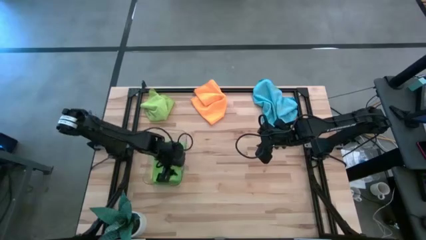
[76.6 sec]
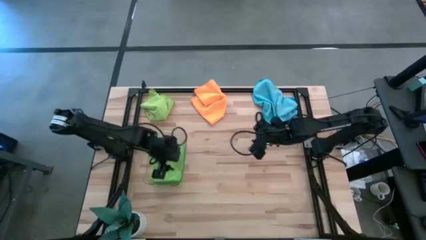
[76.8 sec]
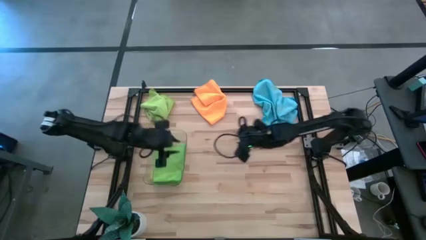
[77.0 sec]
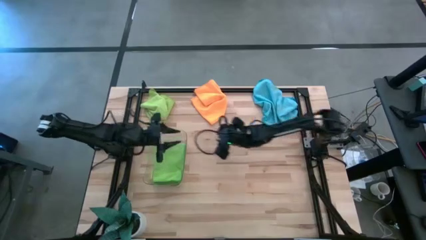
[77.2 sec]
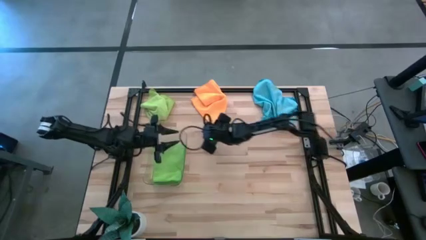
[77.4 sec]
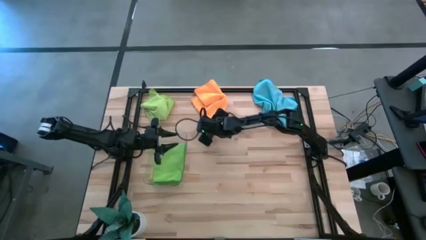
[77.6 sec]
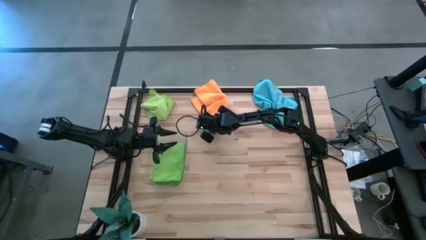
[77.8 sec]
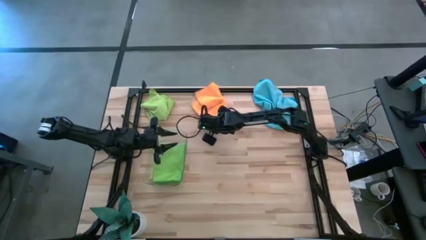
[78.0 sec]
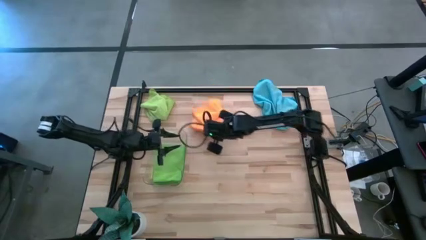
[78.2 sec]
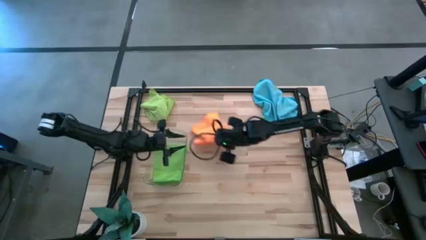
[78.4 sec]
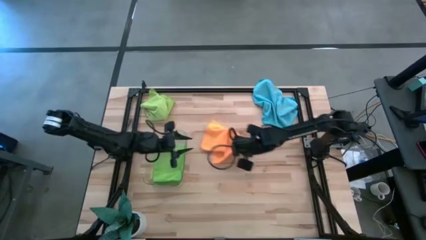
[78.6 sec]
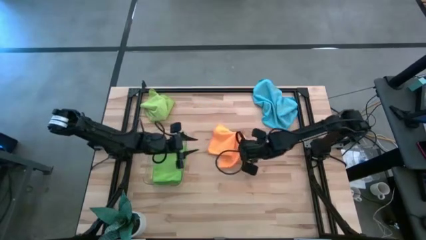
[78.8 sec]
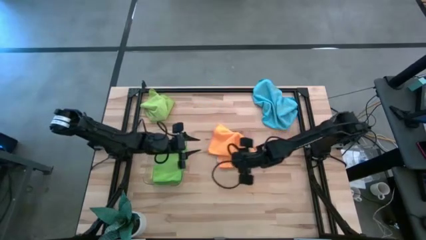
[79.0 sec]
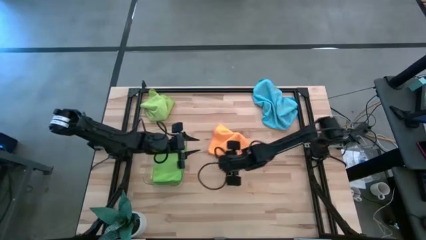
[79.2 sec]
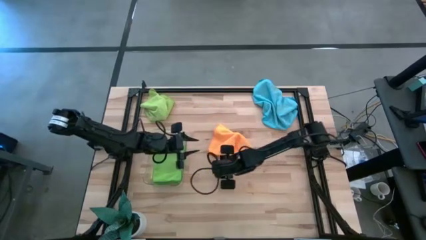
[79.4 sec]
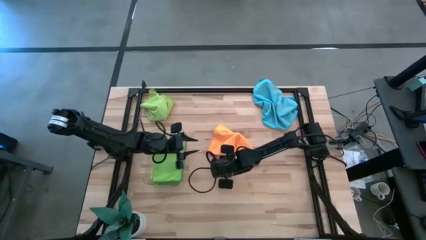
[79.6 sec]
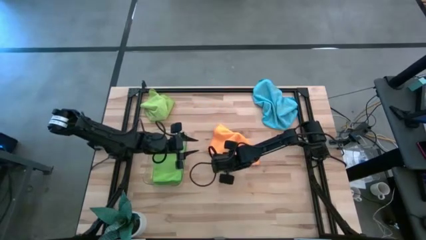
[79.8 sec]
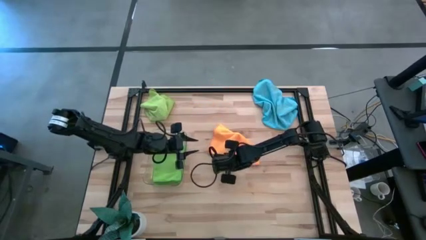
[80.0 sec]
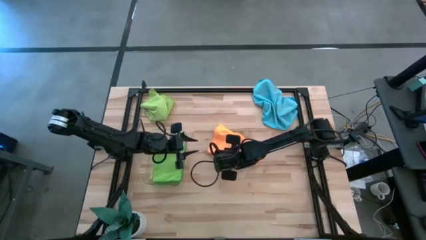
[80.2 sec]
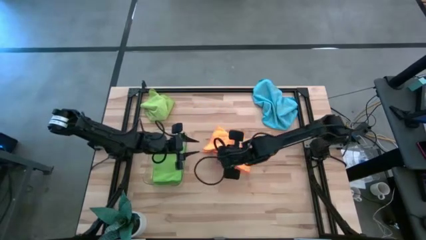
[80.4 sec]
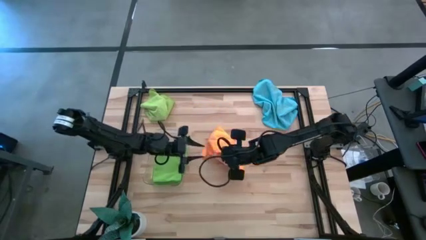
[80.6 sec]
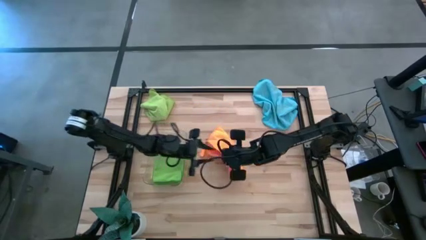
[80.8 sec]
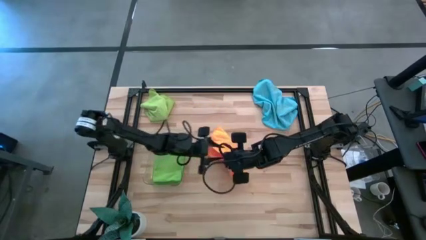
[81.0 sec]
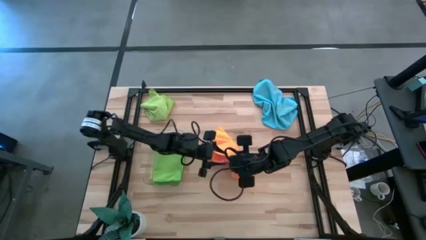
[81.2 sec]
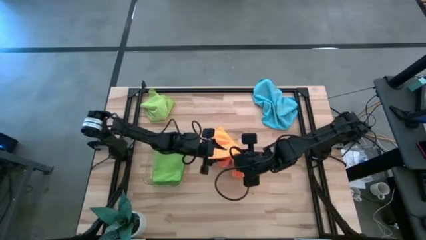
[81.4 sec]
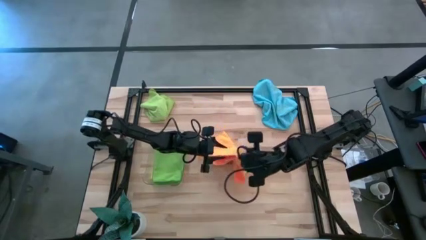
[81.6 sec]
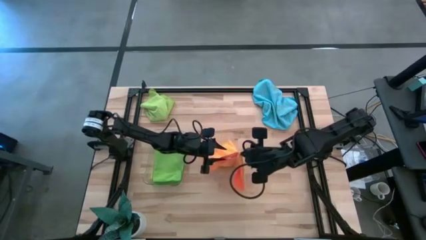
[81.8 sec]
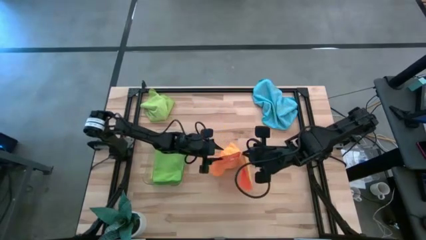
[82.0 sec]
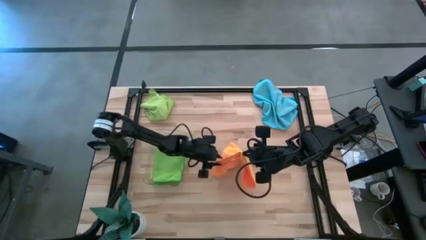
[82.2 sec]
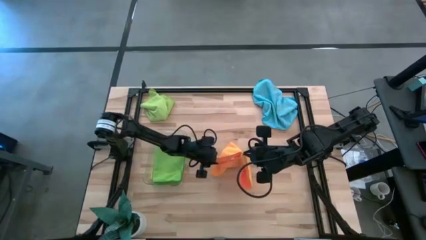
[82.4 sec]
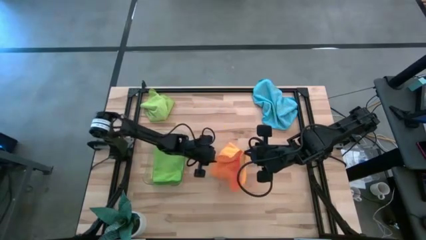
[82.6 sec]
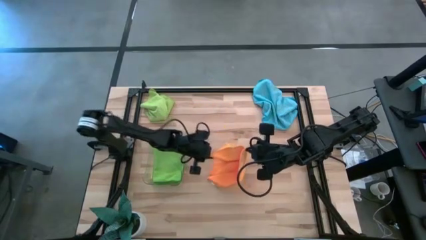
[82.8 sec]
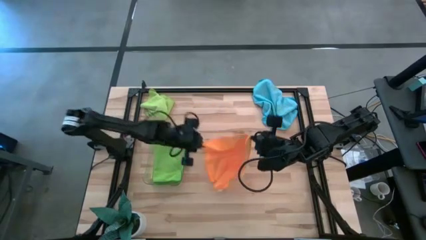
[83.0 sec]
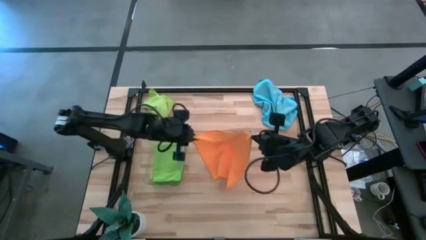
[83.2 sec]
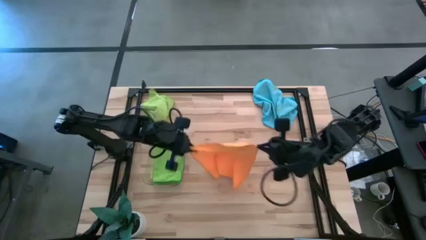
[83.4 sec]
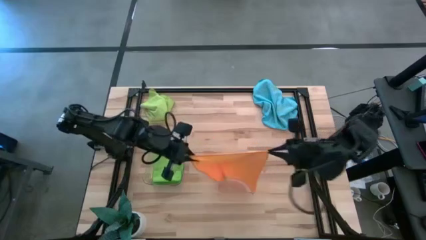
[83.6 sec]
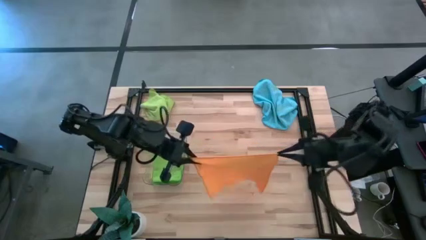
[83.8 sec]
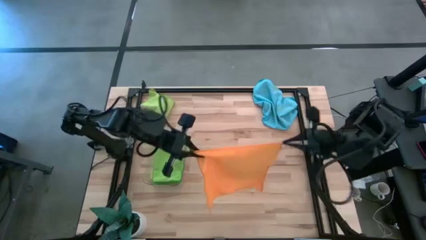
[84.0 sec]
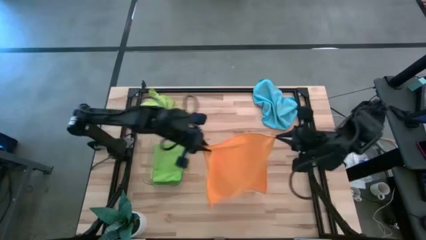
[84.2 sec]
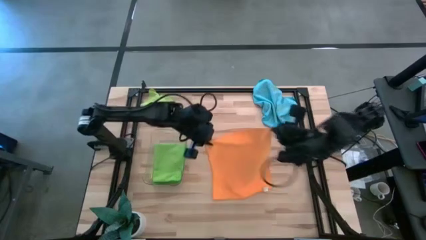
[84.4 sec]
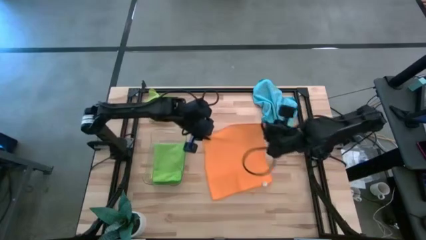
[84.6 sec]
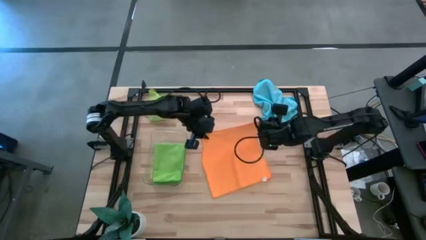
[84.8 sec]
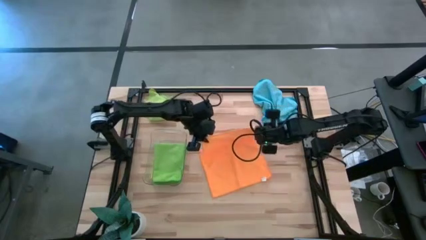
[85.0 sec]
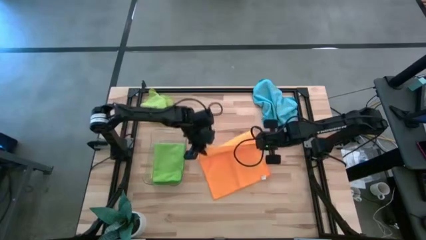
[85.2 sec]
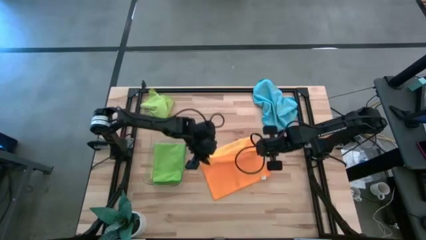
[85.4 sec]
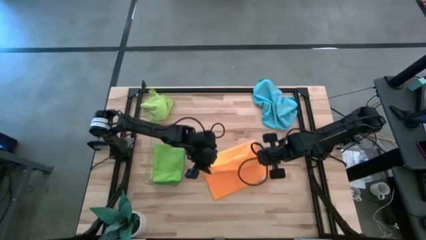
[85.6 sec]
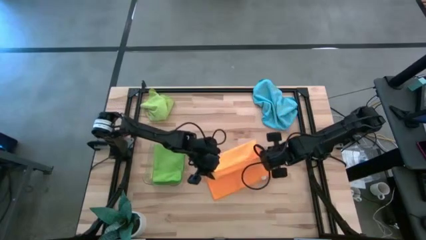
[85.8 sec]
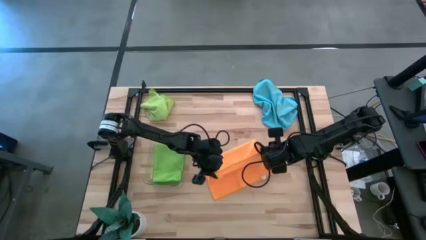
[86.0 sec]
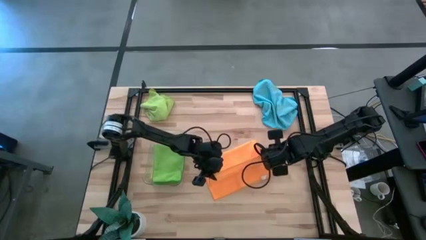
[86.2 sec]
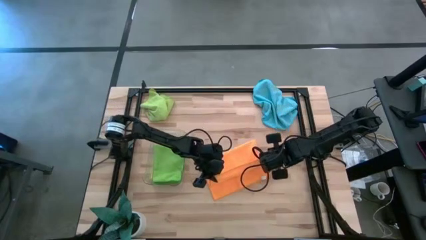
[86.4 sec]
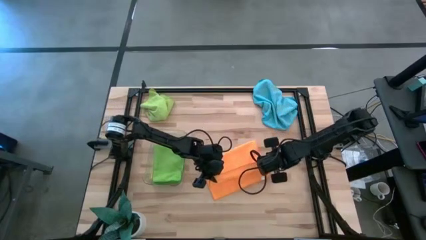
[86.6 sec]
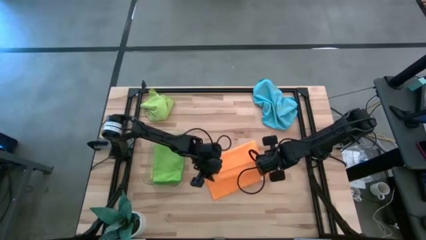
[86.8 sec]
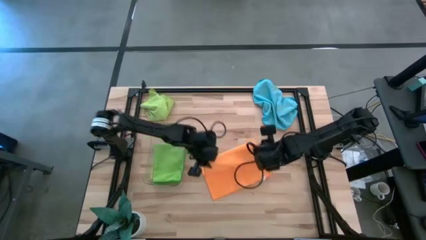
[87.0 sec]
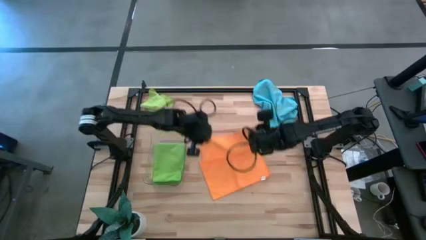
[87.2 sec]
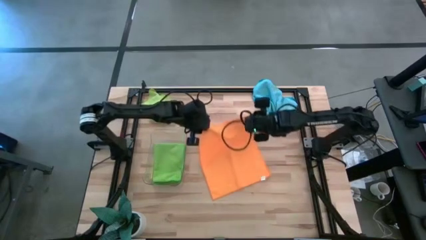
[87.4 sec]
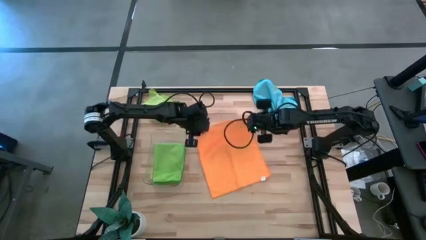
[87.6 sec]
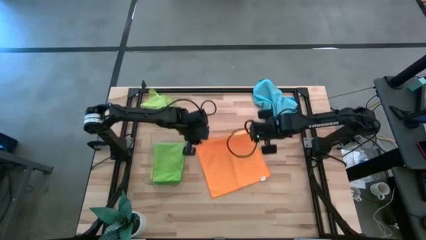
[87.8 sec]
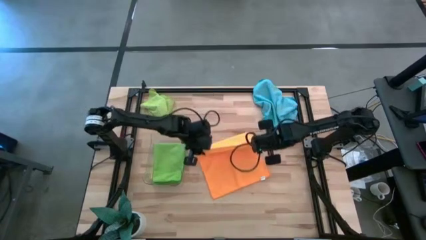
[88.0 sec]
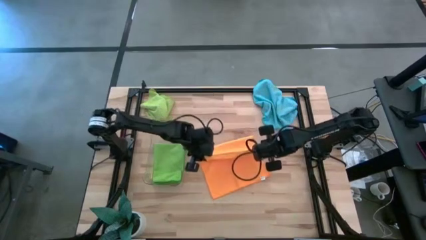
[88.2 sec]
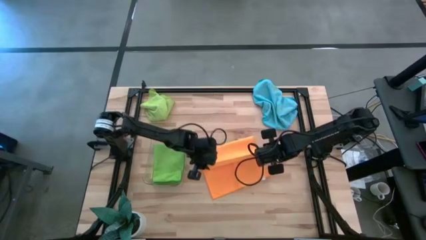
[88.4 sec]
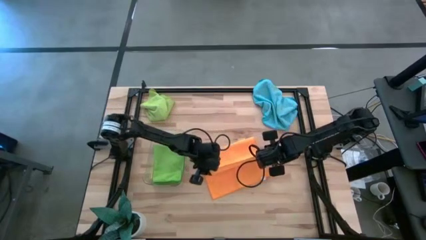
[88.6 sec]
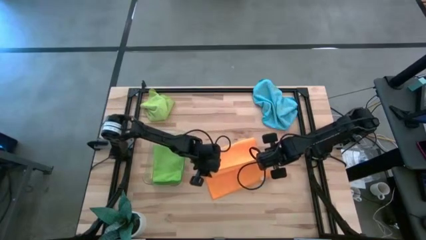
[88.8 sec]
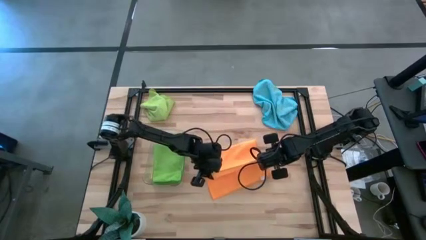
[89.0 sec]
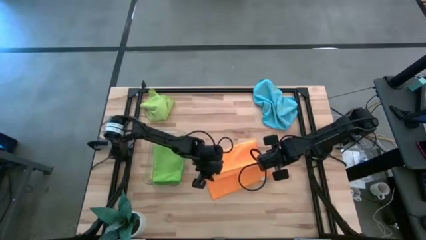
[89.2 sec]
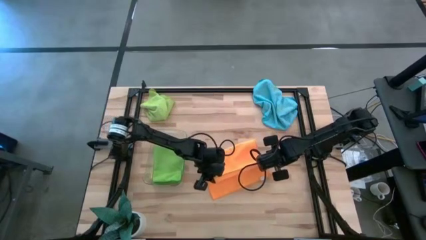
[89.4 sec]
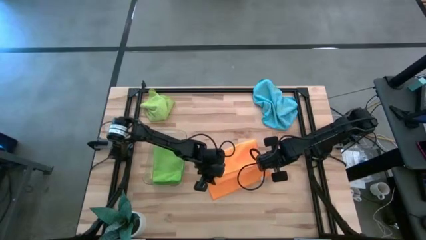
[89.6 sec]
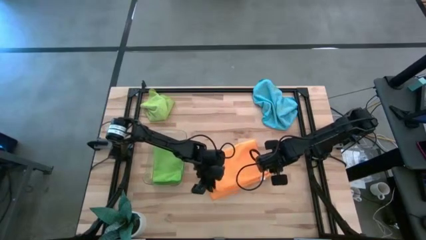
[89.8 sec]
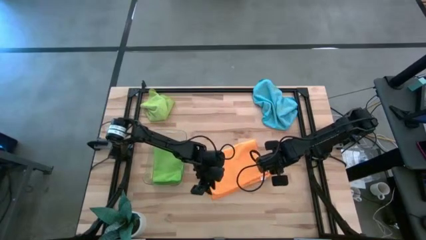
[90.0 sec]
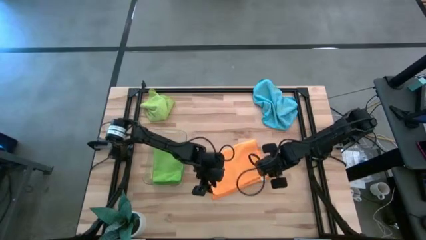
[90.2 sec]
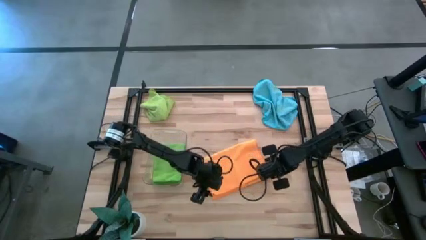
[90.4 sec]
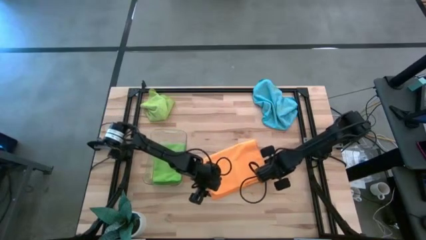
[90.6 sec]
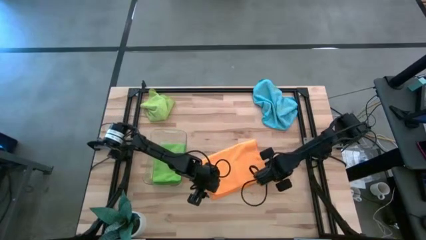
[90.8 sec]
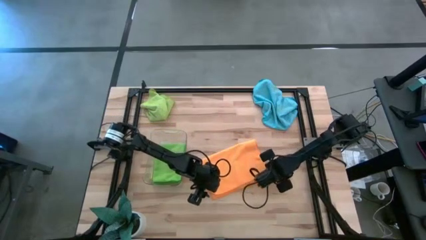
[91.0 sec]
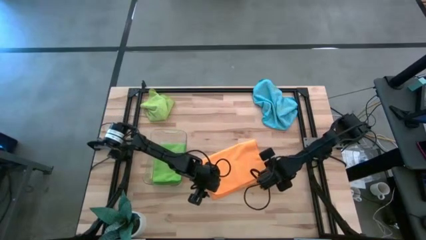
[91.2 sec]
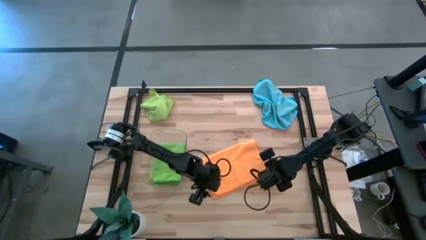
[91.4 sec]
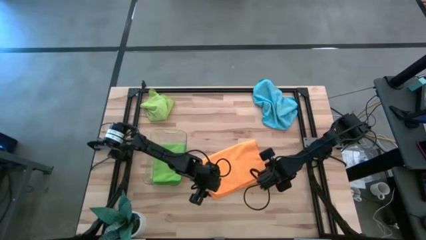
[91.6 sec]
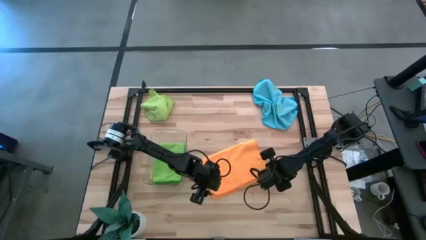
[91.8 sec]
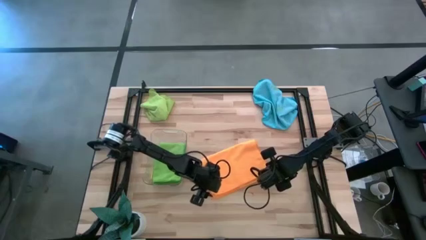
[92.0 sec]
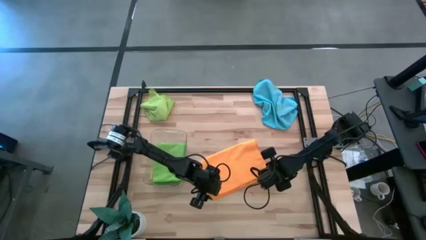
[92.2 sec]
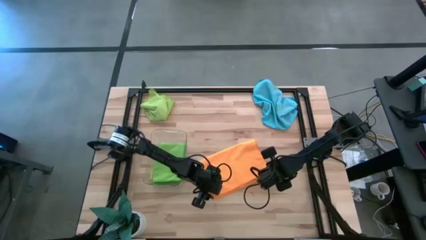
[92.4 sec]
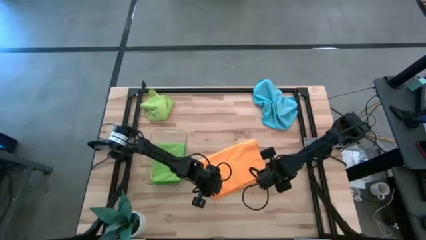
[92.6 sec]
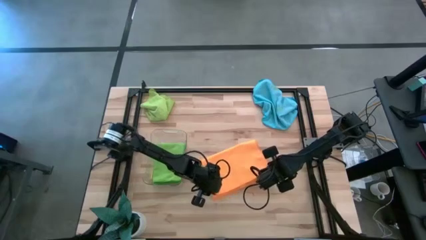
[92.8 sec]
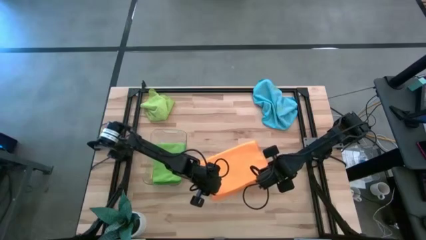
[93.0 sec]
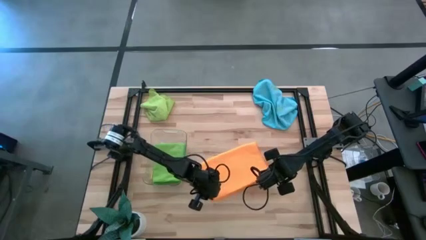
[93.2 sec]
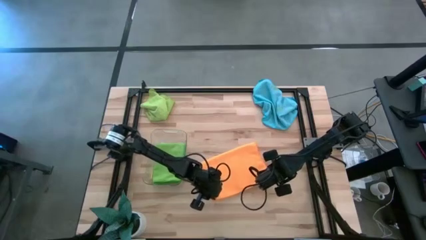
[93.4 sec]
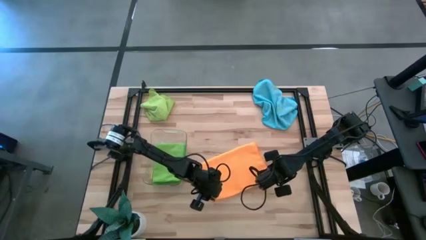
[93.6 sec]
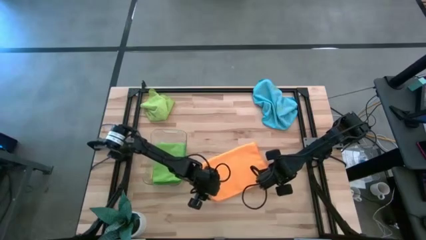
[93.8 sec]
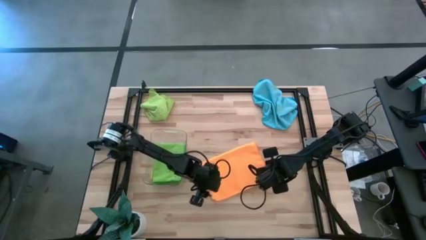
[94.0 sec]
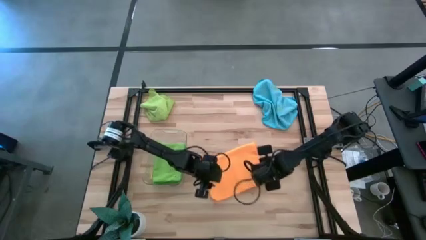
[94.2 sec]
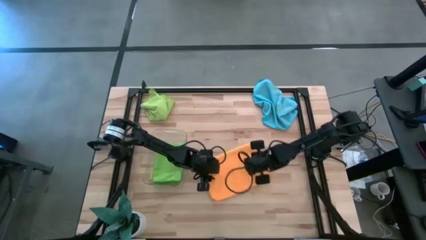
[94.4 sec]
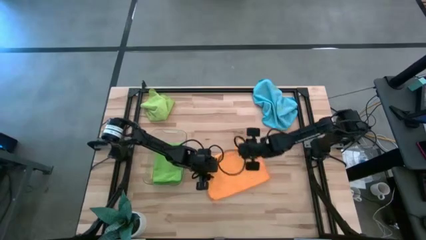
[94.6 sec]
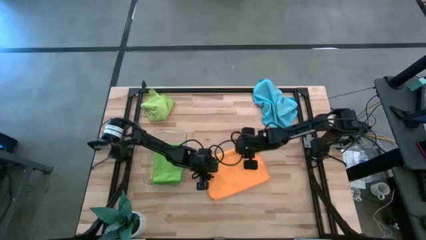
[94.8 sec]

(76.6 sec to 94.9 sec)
Task: Fold microfiber towels
Fold the orange microfiber towel on the table
